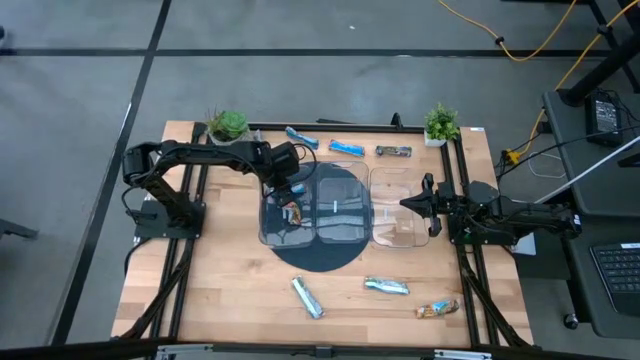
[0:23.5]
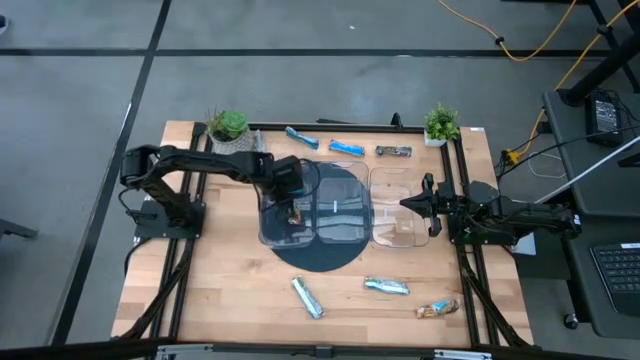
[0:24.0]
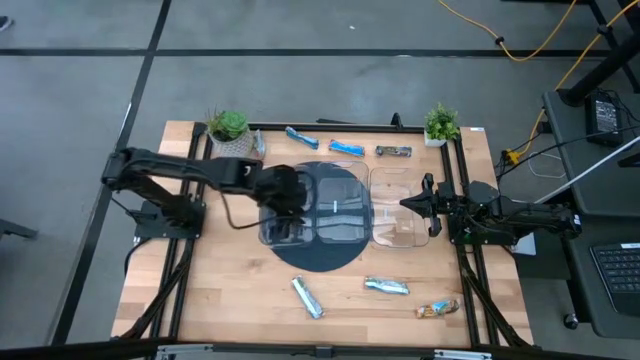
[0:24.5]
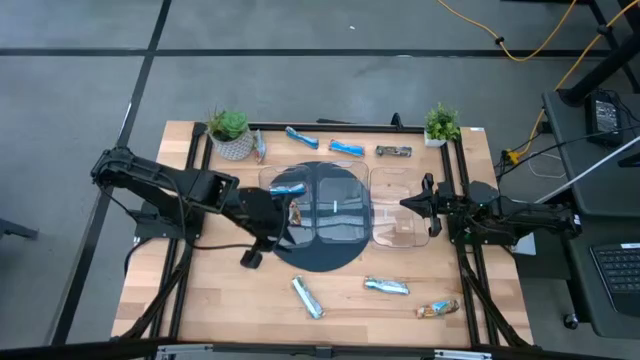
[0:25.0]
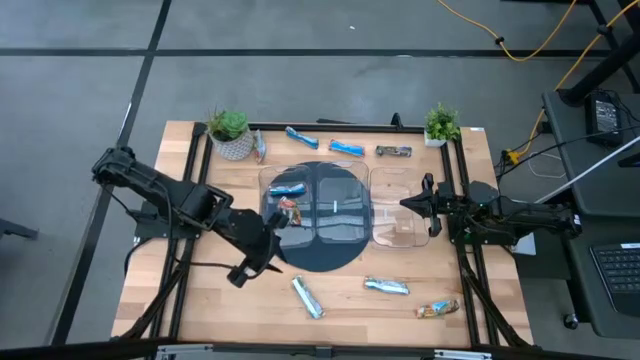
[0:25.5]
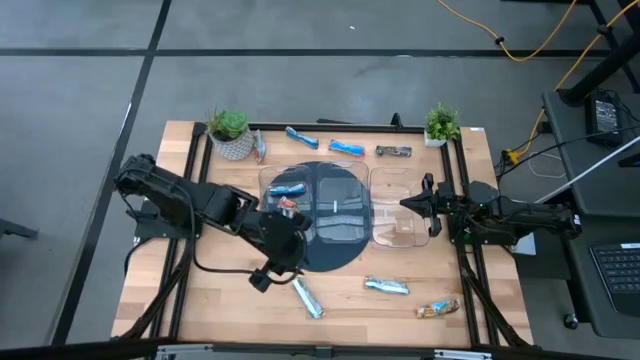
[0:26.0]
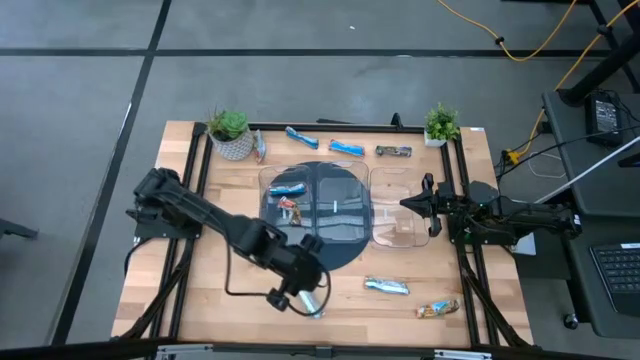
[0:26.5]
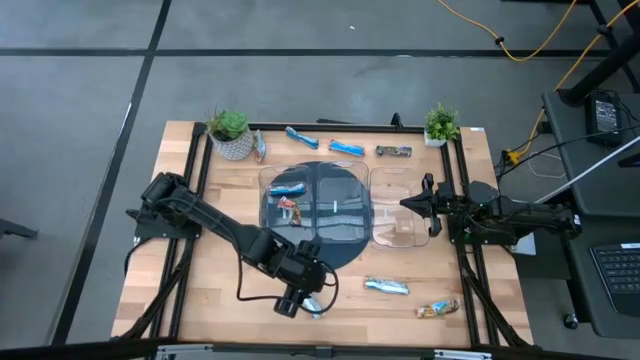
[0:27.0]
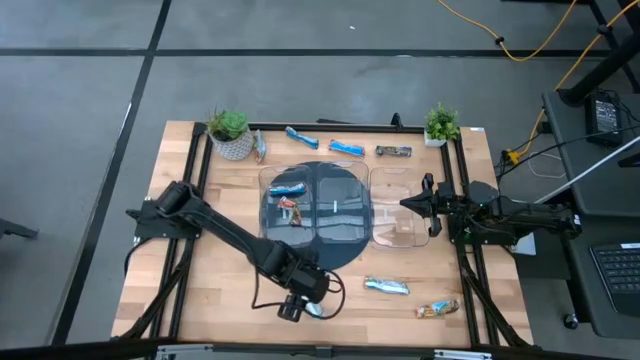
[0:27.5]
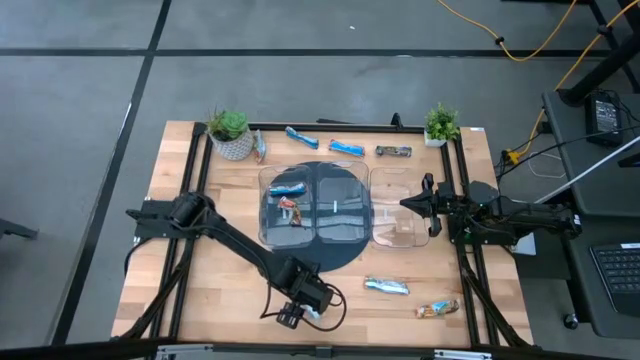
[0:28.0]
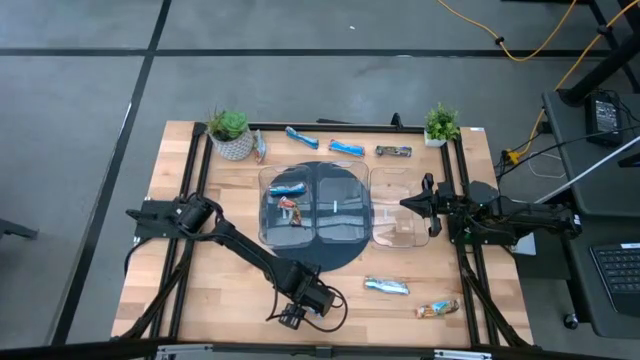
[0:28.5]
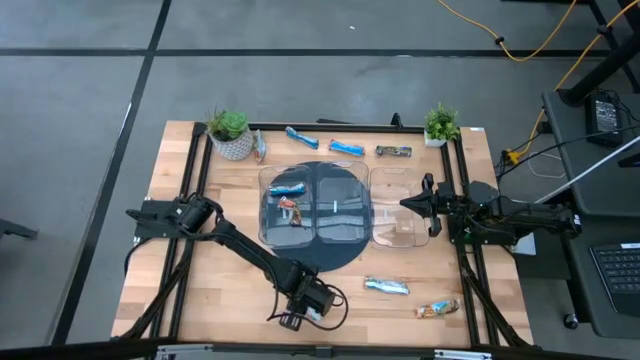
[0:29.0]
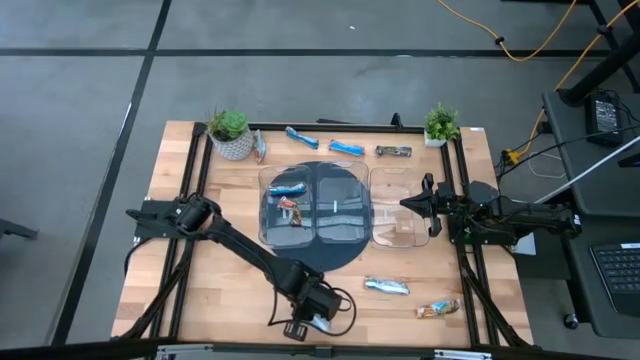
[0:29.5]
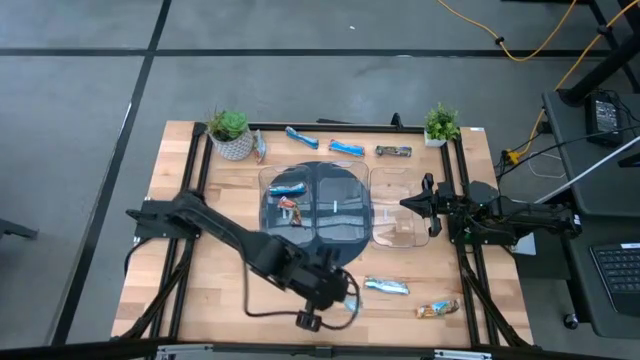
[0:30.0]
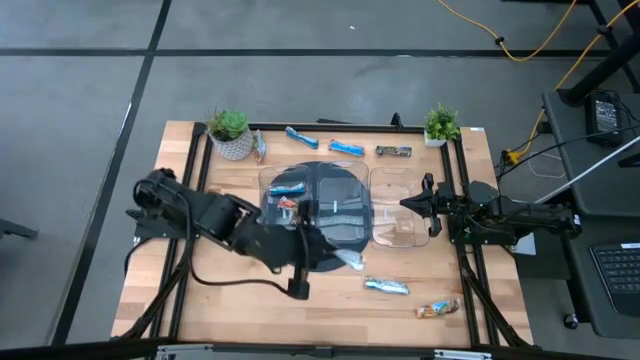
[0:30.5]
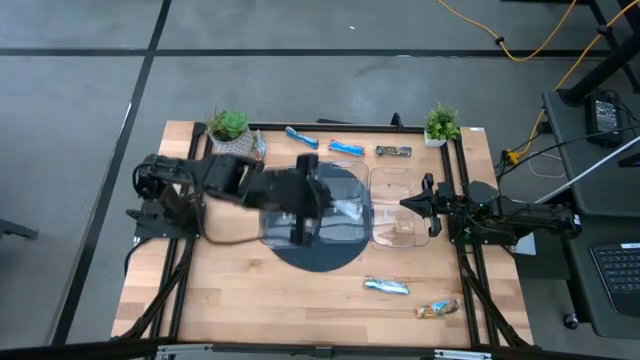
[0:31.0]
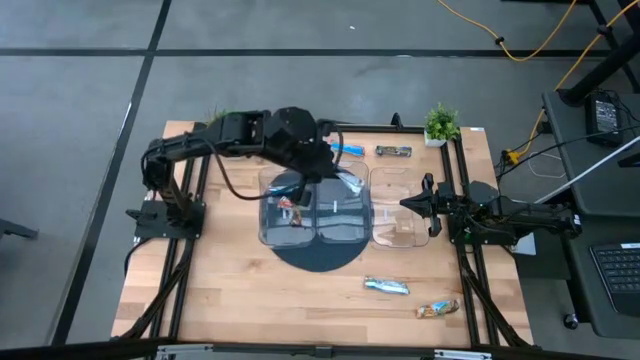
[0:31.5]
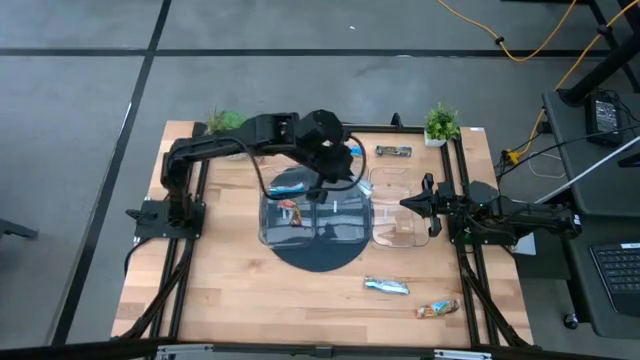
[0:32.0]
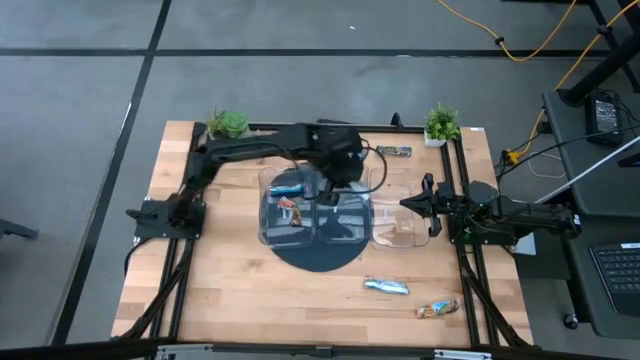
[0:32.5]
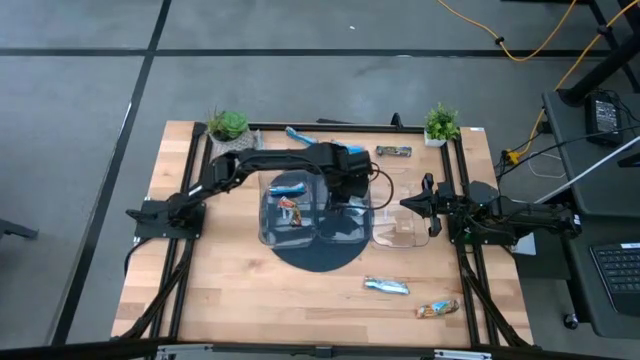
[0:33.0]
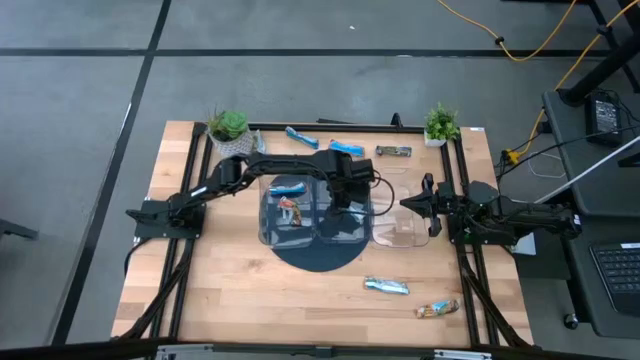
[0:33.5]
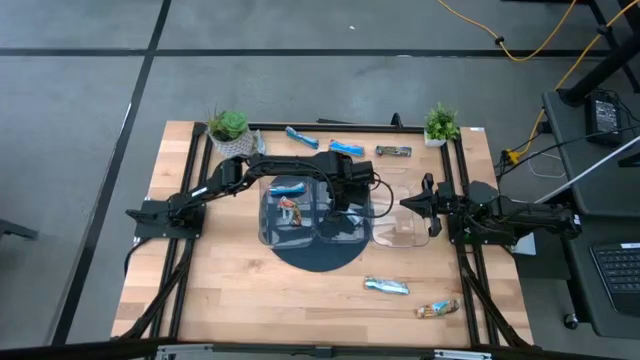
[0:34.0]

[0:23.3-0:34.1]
Task: Pick and place Granola Bars by type
Put the yellow granola bar into the center transparent bin

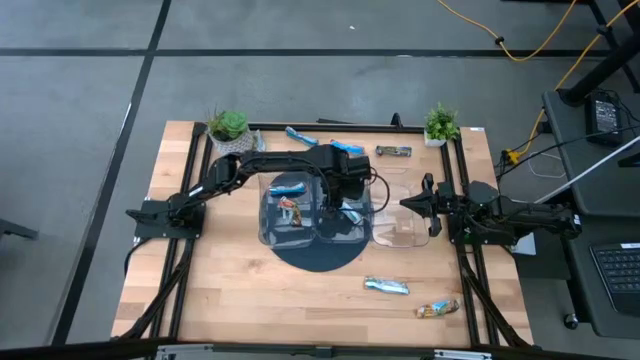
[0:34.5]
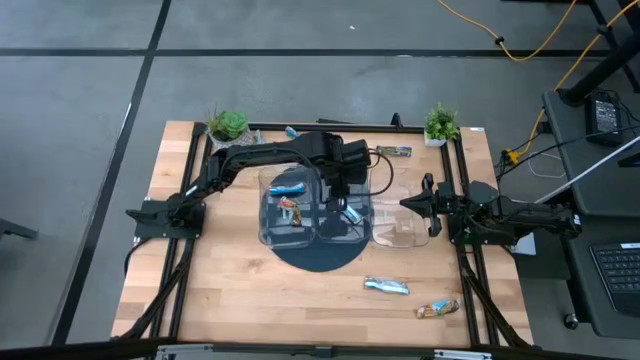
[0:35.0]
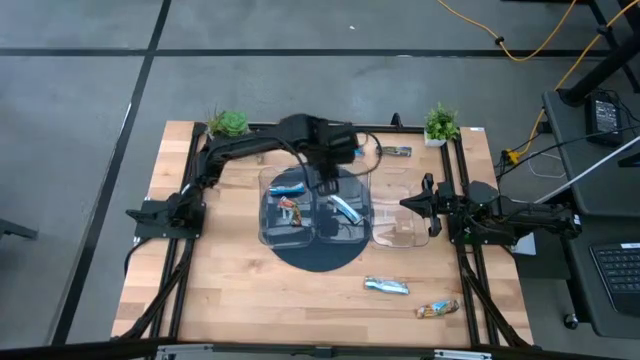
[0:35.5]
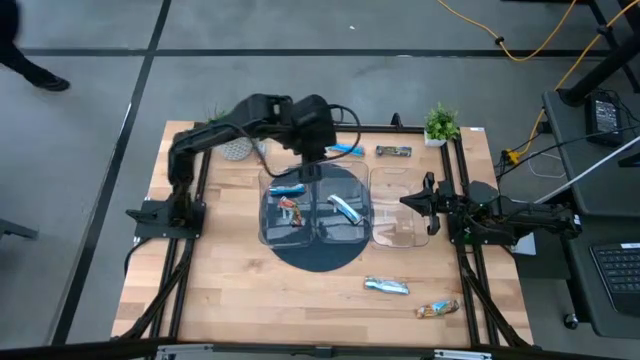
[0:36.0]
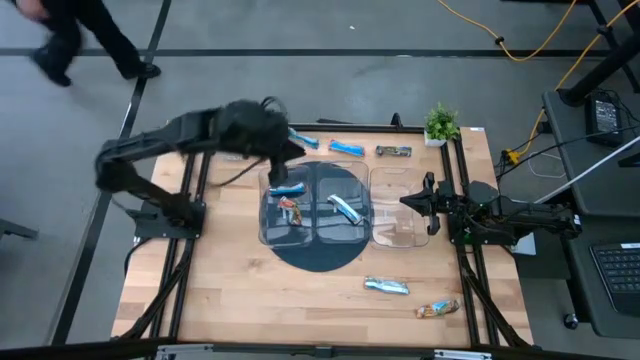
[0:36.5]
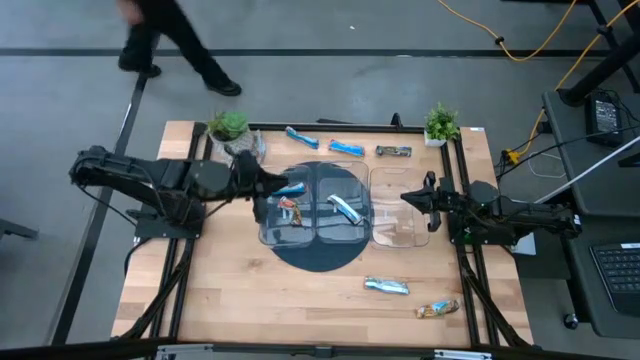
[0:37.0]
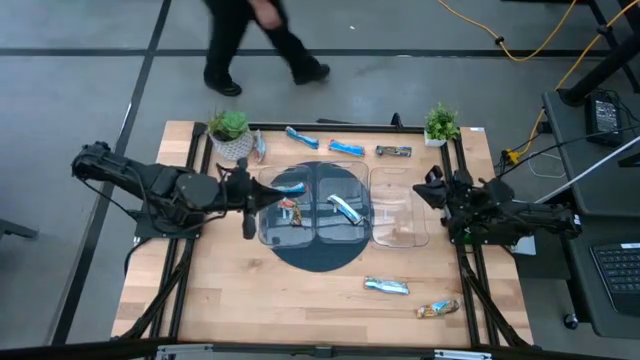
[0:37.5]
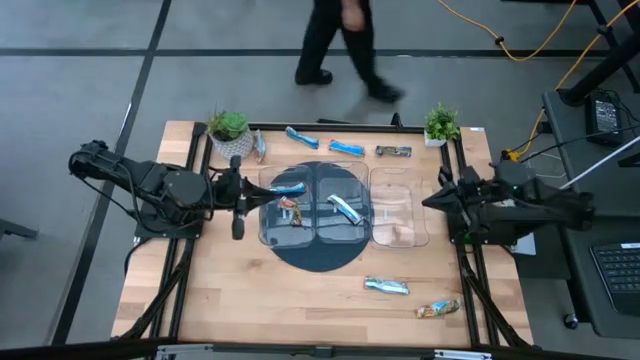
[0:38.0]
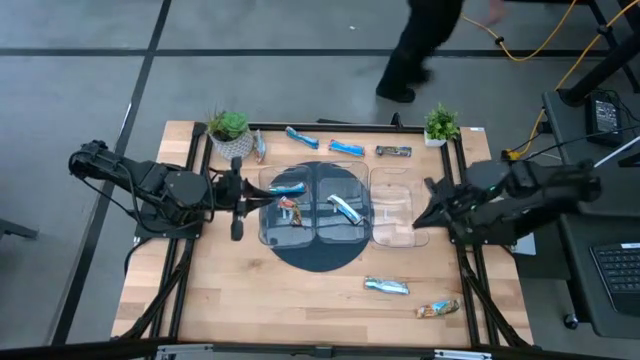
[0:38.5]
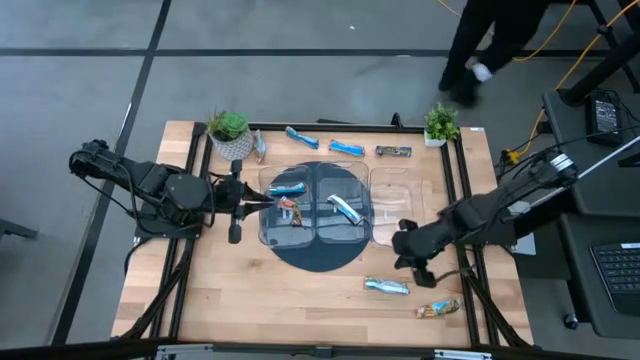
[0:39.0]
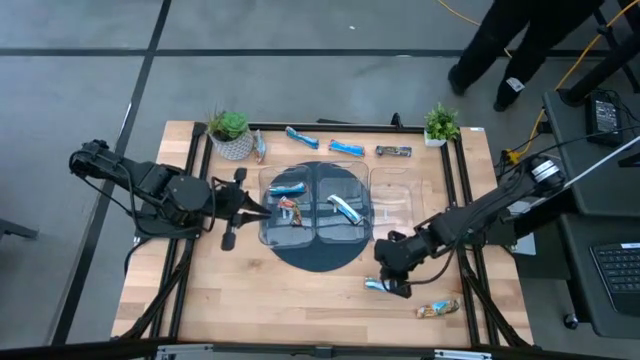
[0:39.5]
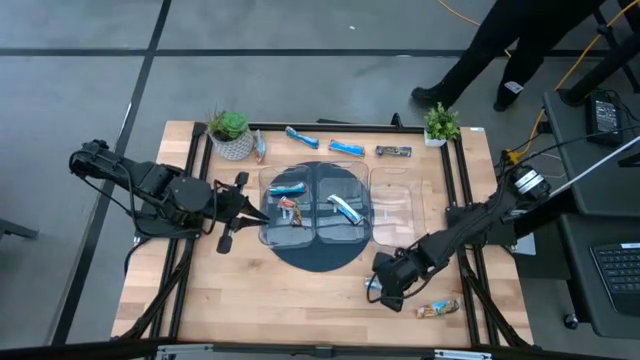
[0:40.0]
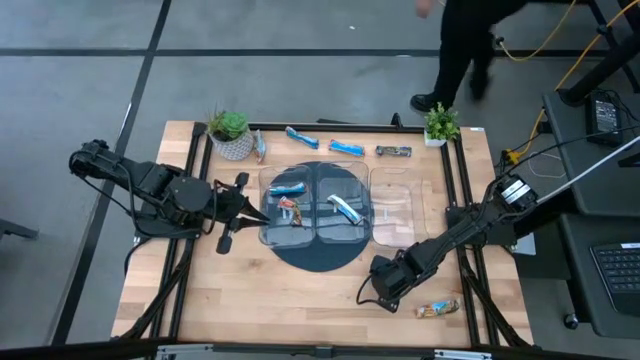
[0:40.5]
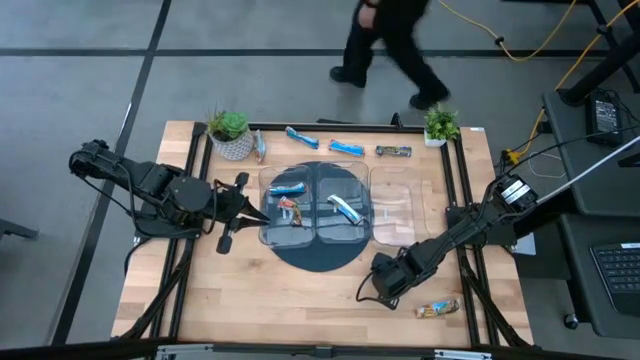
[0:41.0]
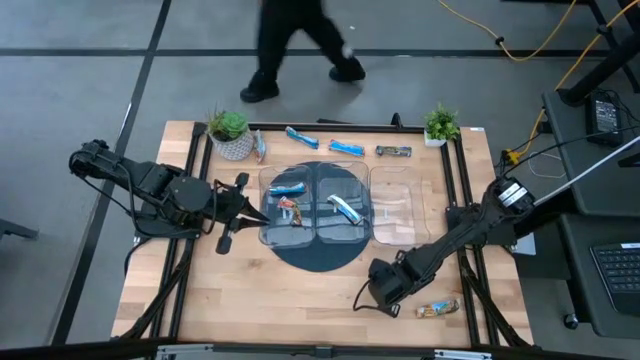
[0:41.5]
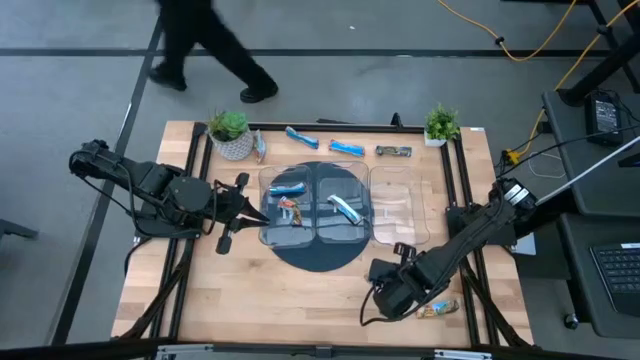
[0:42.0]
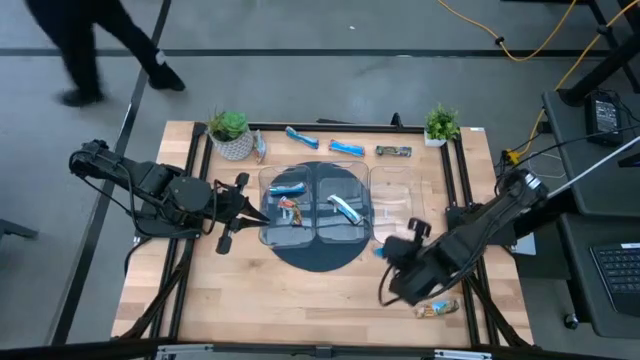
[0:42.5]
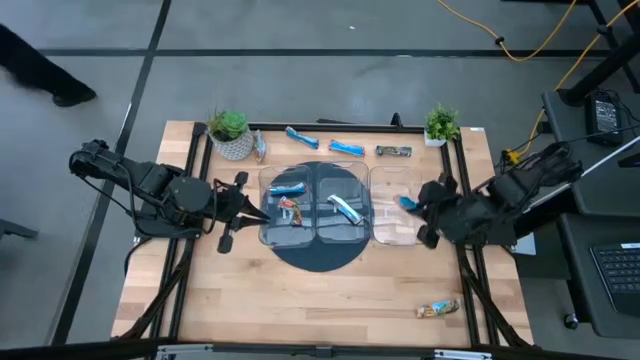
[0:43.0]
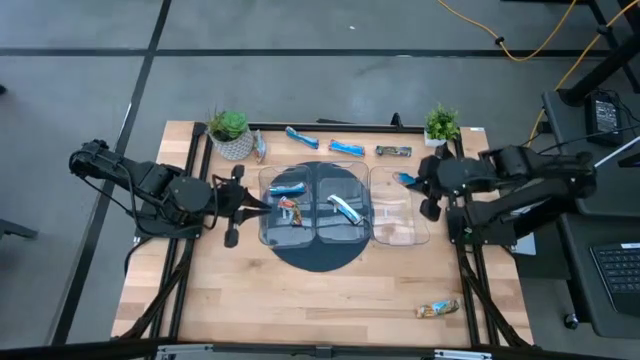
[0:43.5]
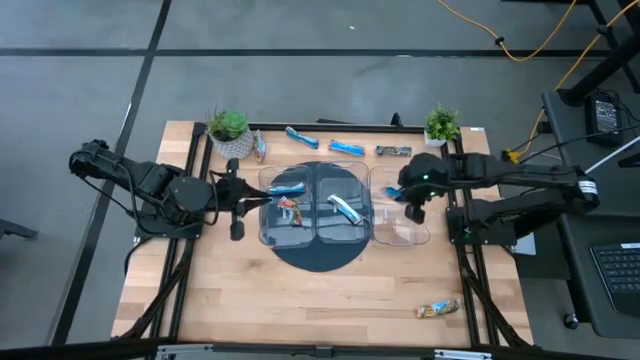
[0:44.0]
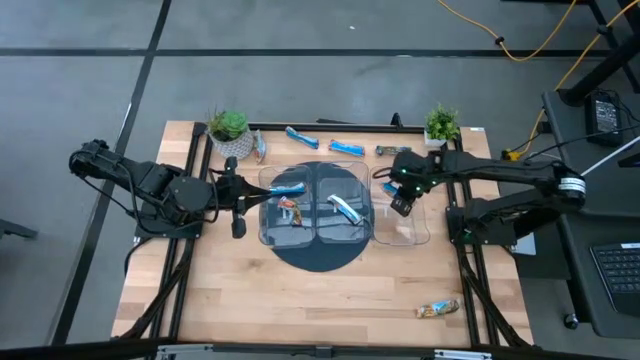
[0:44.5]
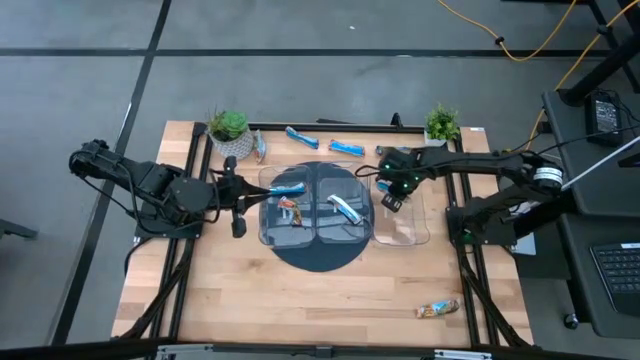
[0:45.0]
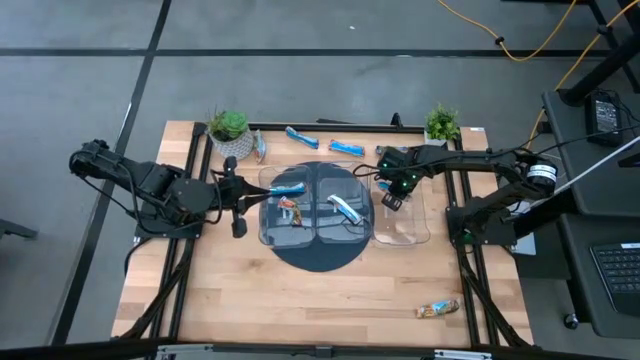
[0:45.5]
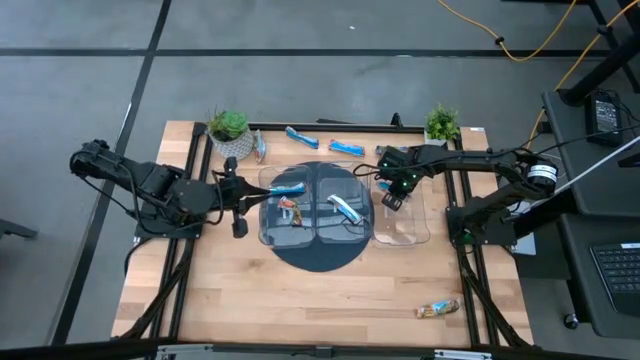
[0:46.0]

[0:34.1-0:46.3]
Put the yellow granola bar into the right transparent bin
